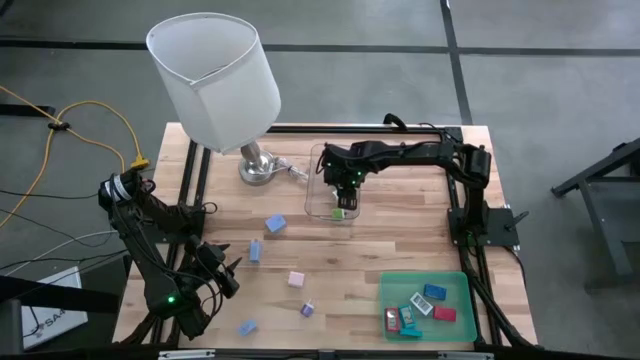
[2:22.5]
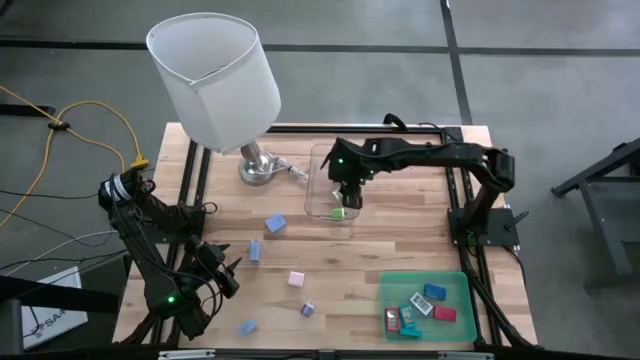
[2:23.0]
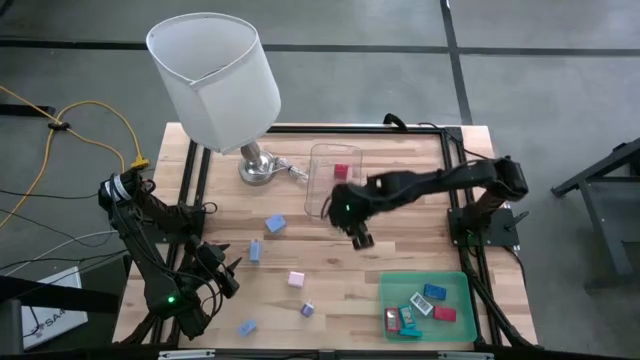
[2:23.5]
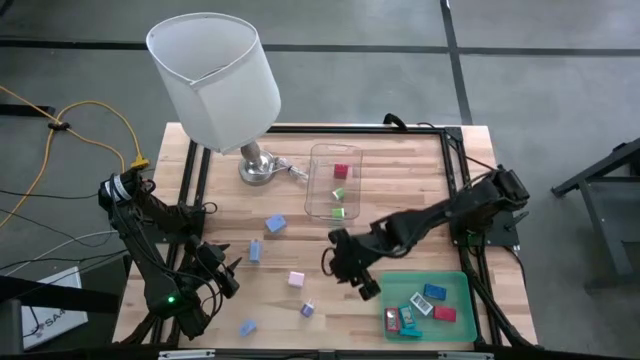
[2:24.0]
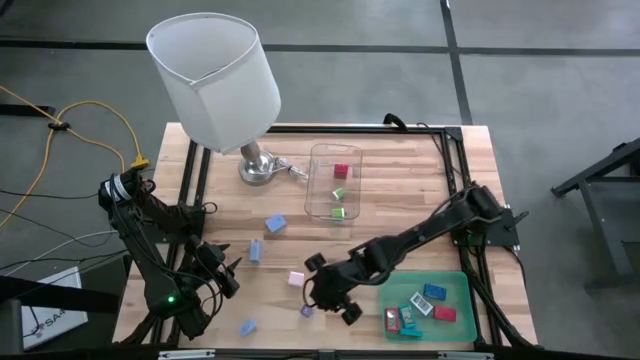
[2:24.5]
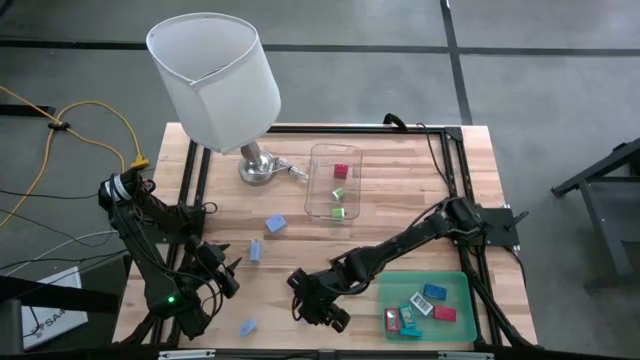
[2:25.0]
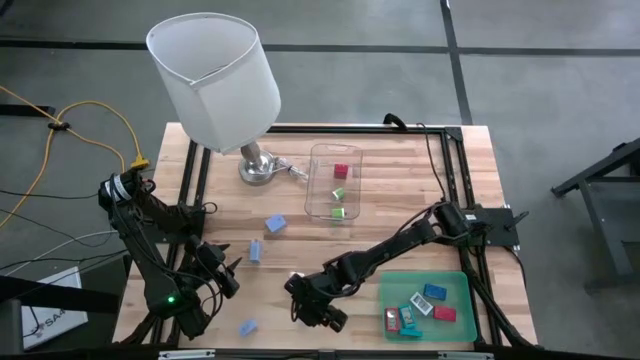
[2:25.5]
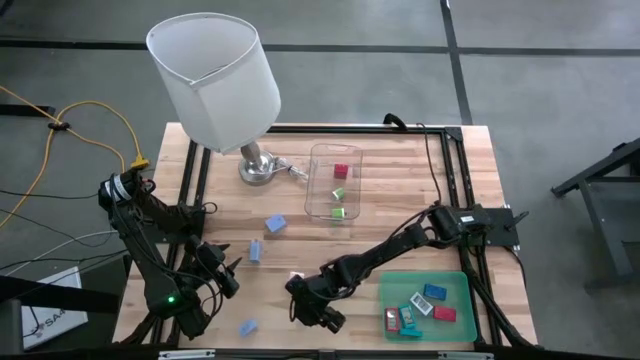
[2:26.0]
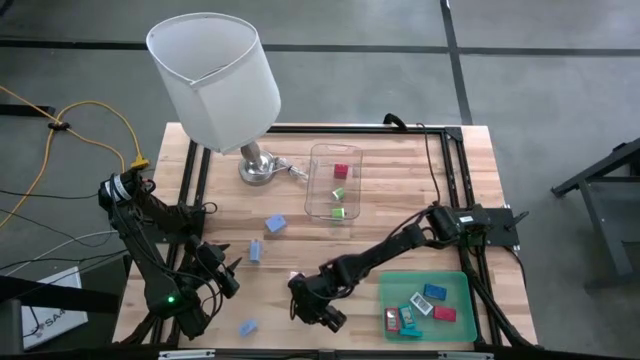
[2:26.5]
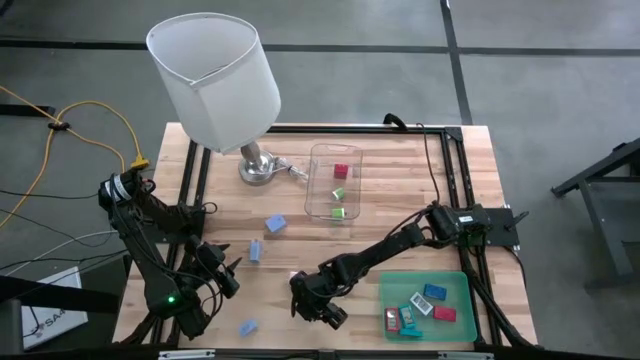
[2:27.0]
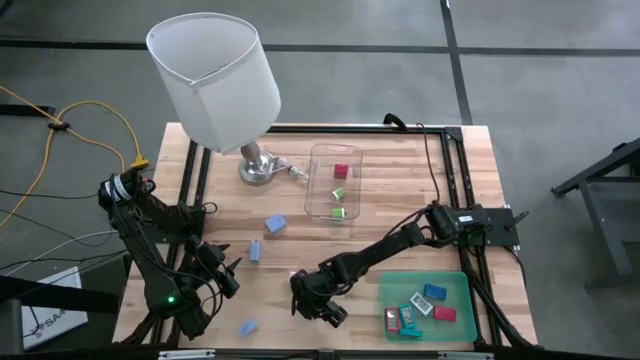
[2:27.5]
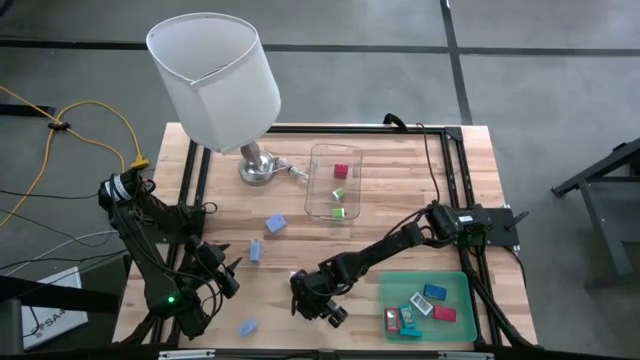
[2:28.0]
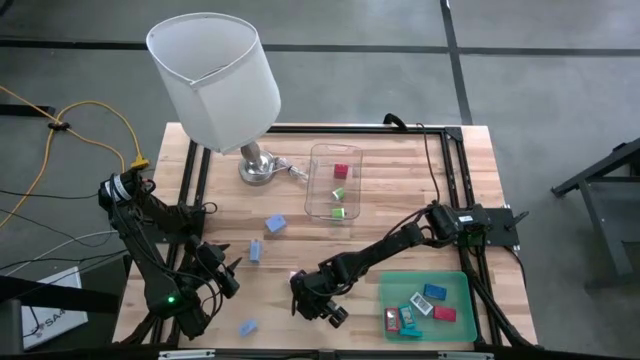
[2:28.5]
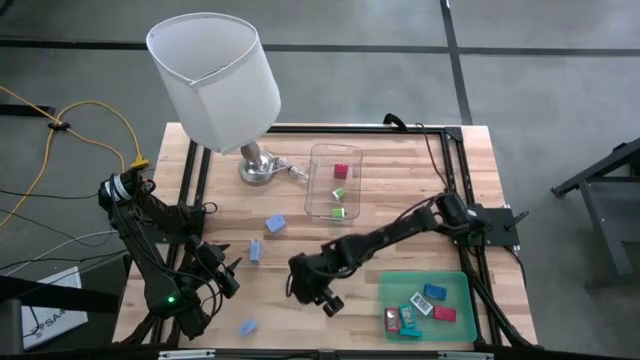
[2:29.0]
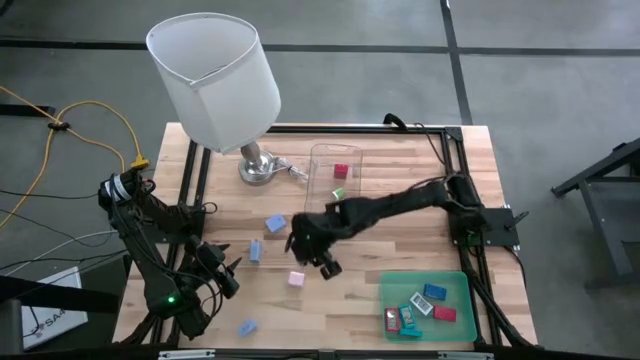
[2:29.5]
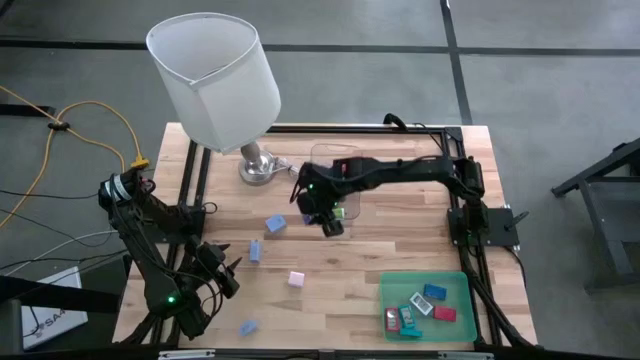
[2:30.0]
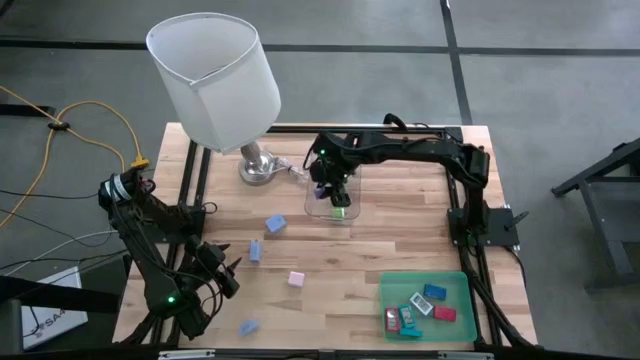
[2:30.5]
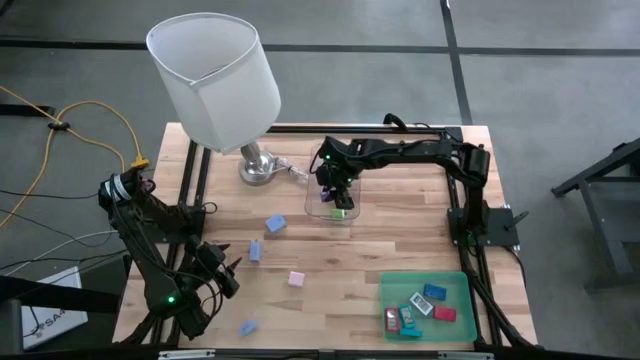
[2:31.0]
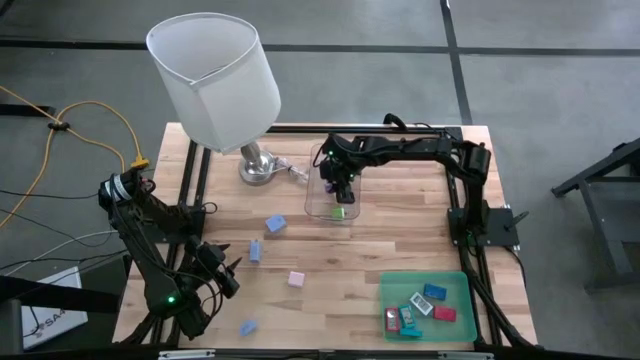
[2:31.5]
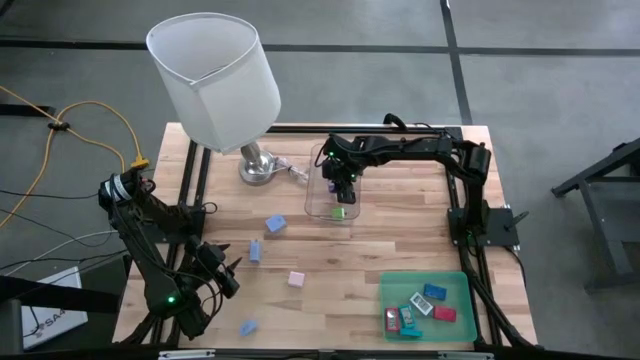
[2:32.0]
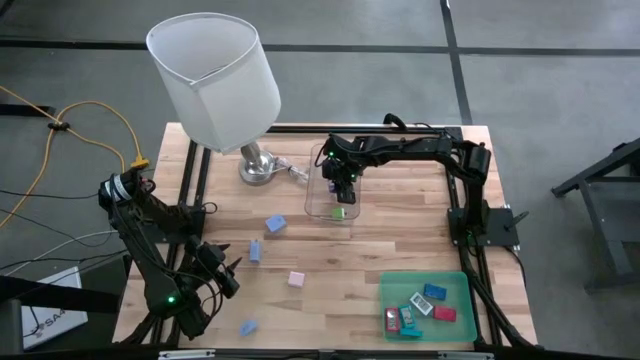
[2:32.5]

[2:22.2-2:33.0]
Task: Pick & Place Office items
Put the purple charger adapter into the transparent bin

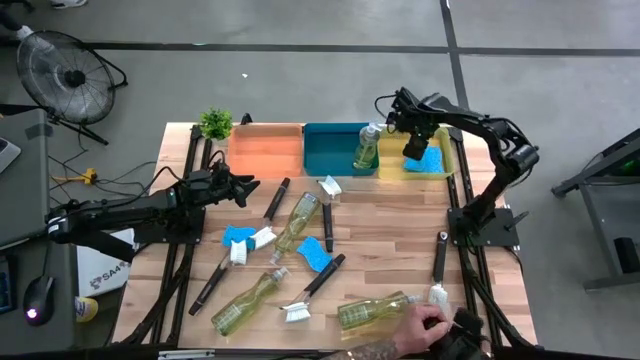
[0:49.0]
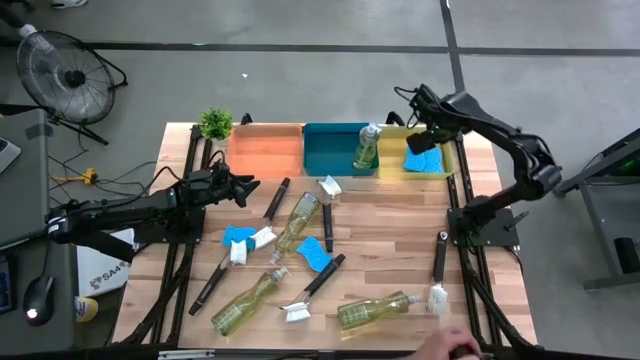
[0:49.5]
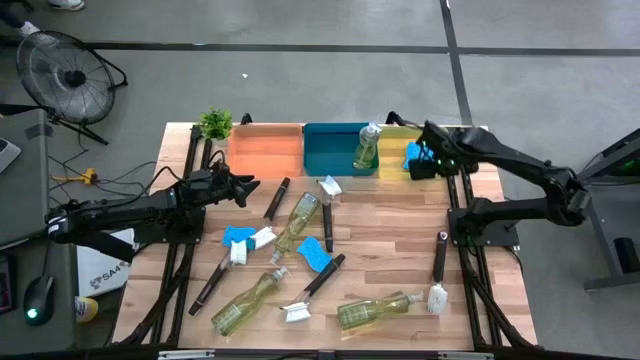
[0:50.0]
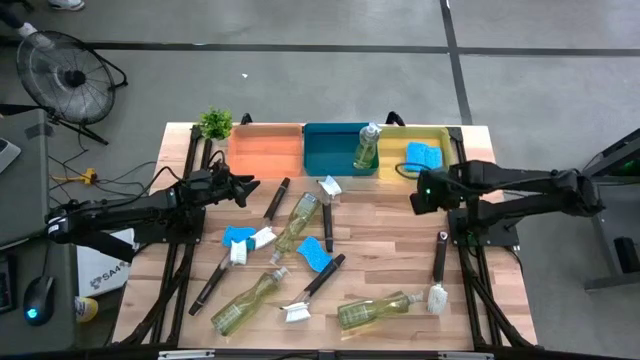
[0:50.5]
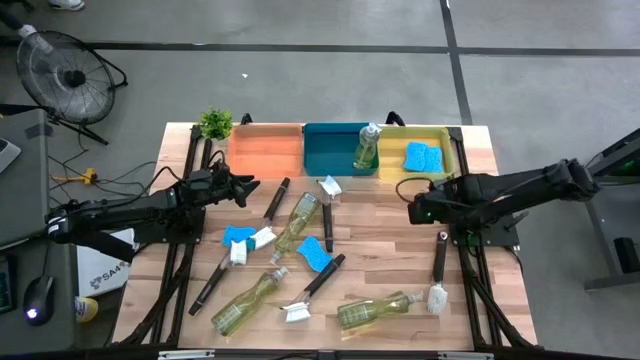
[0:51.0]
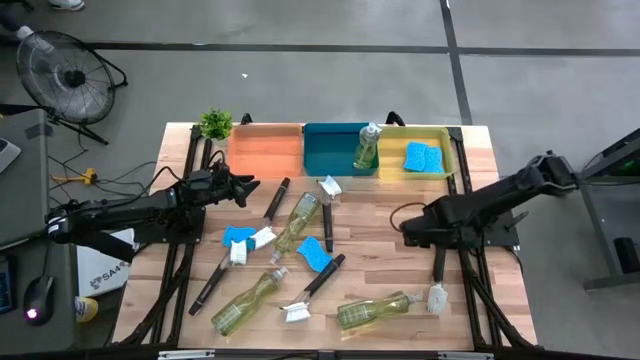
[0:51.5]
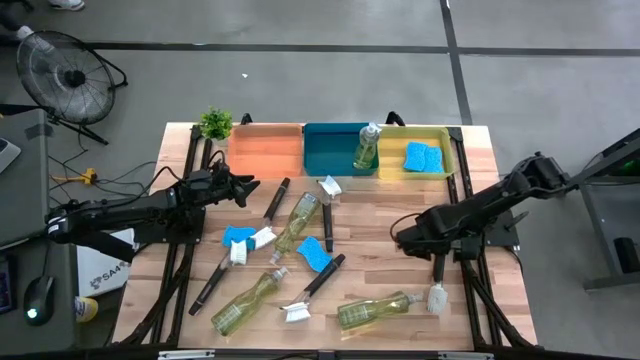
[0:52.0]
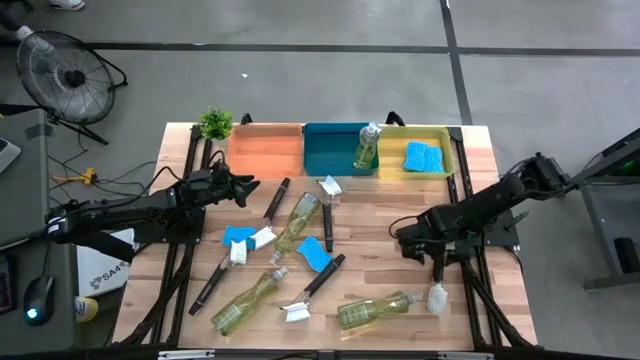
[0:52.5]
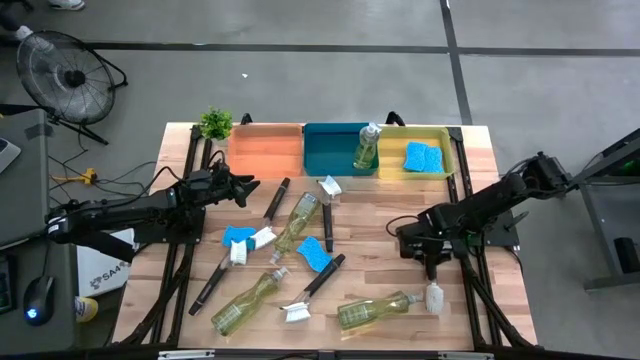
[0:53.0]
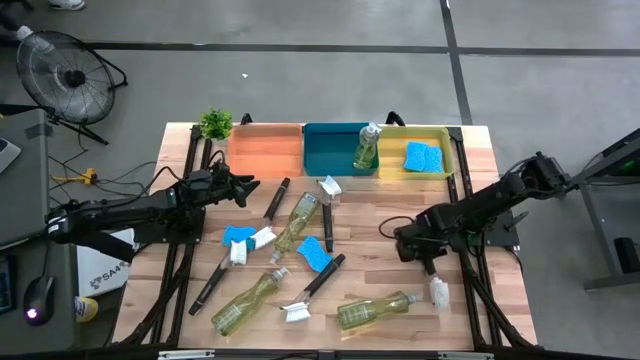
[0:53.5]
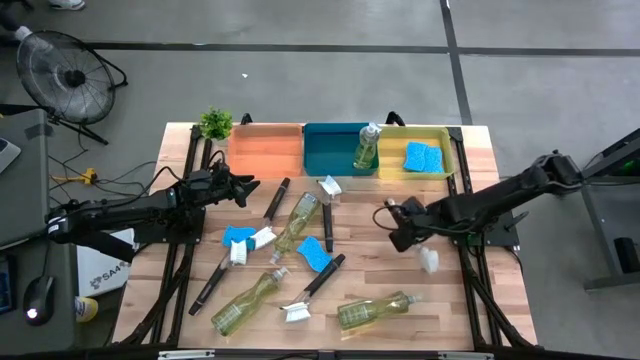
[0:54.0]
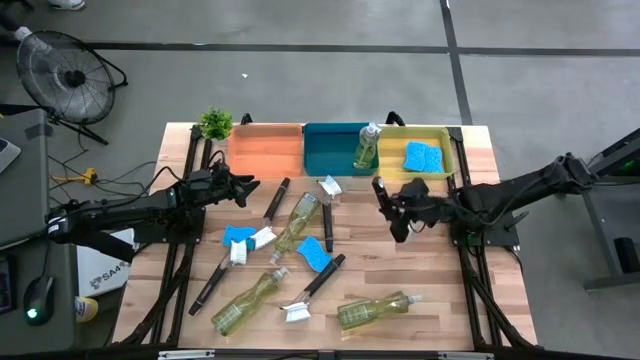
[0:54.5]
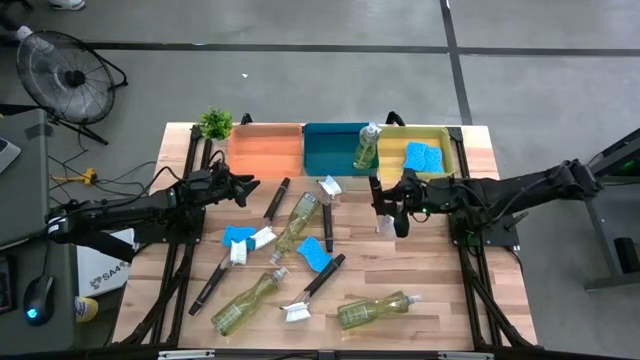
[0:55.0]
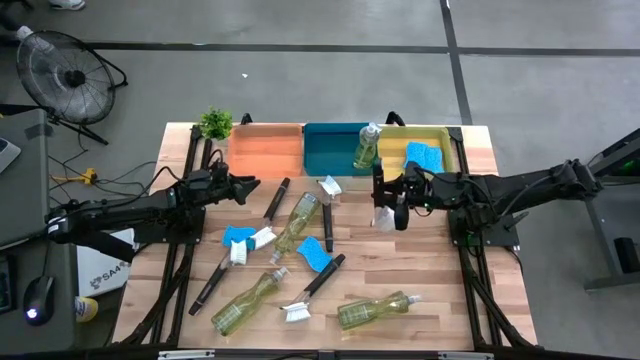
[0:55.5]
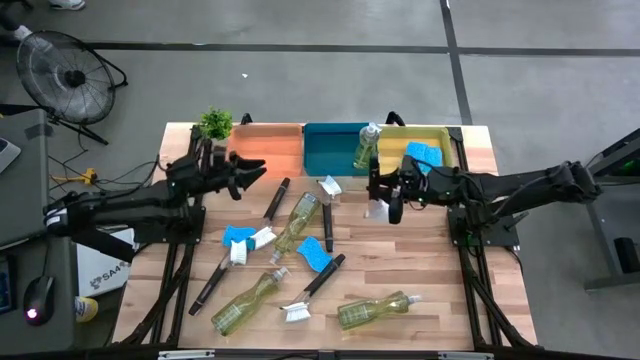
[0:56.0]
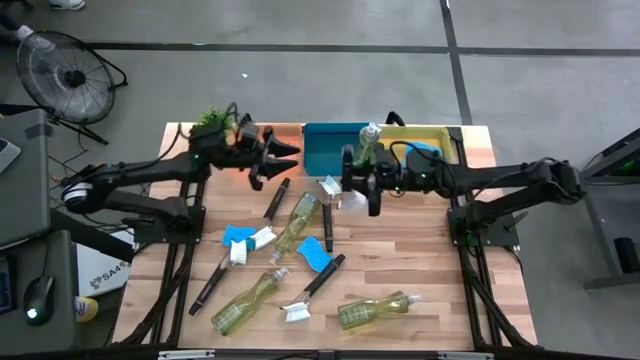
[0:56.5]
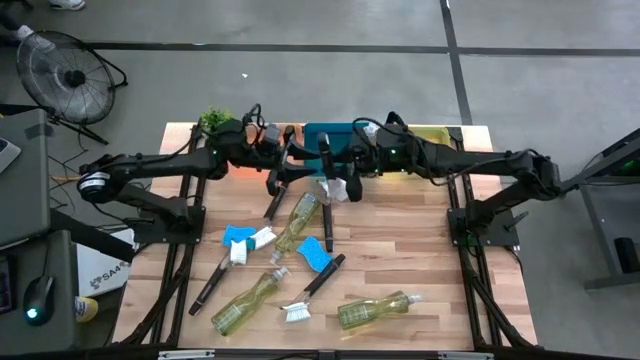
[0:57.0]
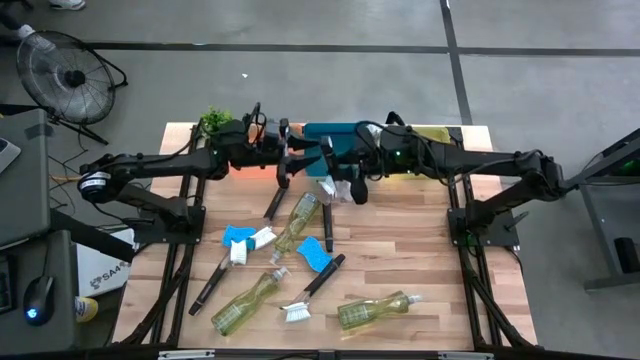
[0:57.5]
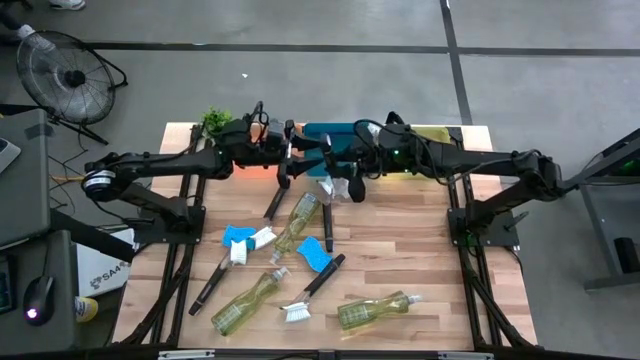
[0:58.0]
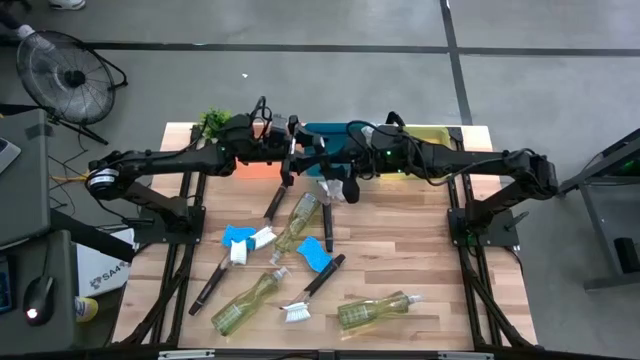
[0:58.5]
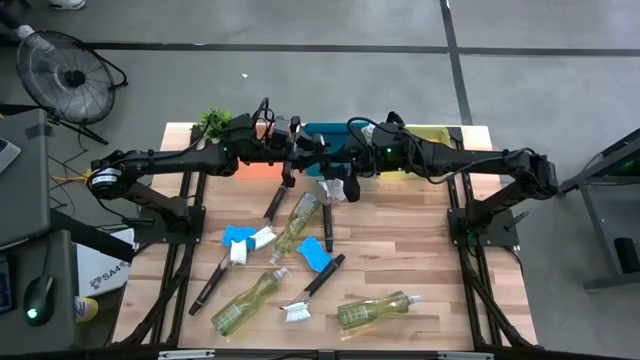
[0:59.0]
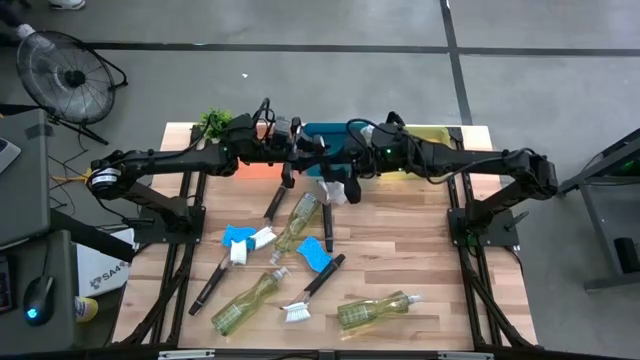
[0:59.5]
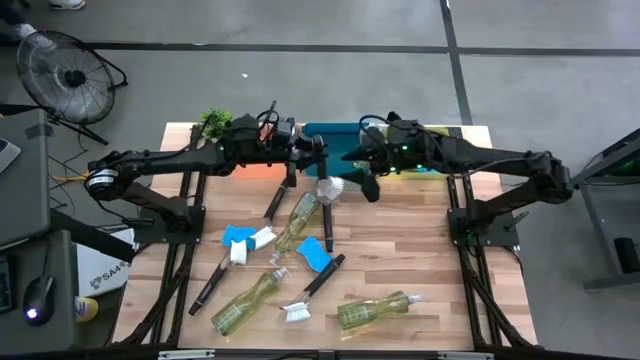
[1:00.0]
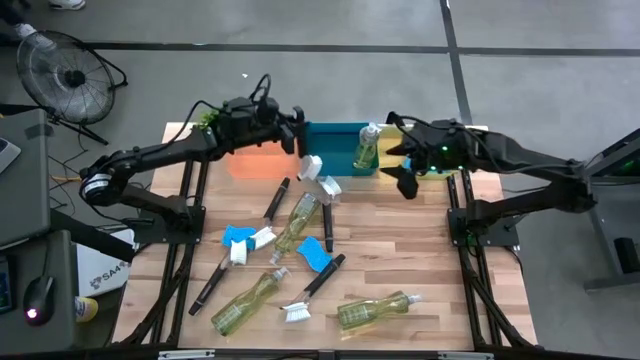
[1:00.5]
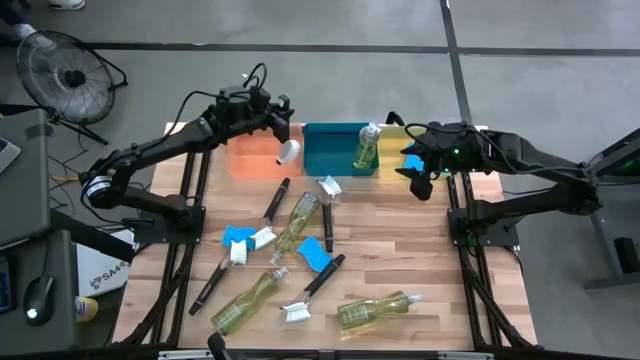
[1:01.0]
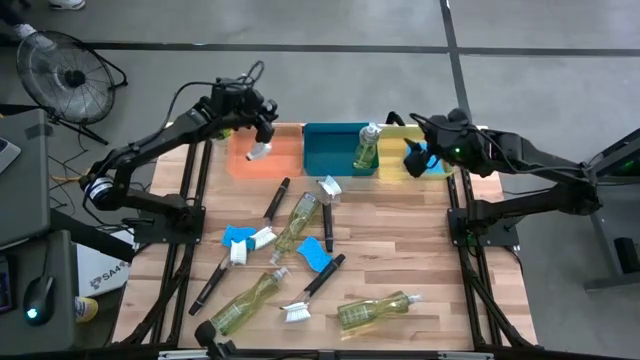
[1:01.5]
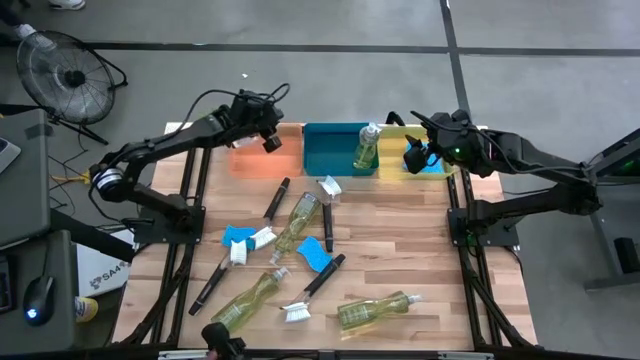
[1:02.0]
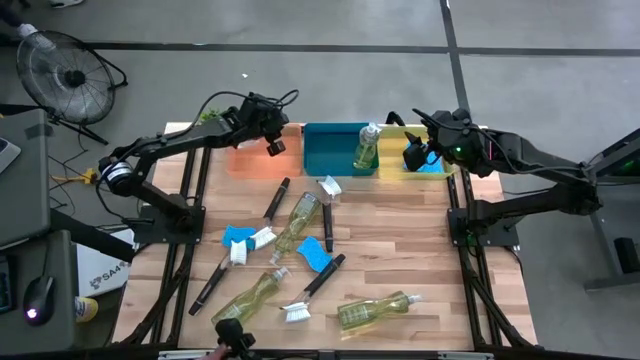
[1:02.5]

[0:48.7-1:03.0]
Task: Pick & Place Kitchen Sink Supplies
Put the cleaning brush into the orange bin
